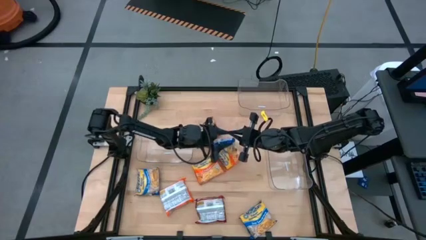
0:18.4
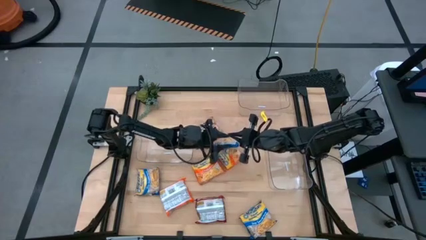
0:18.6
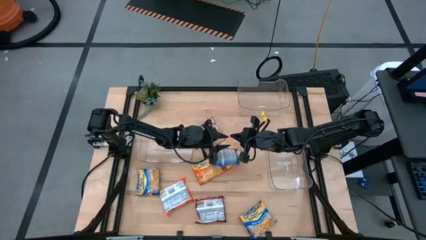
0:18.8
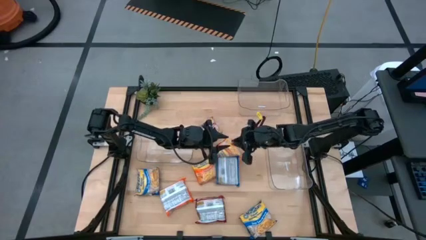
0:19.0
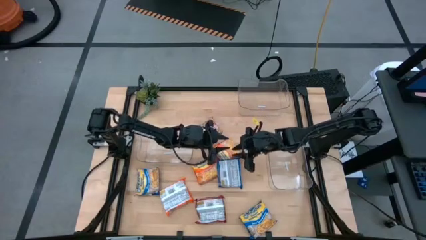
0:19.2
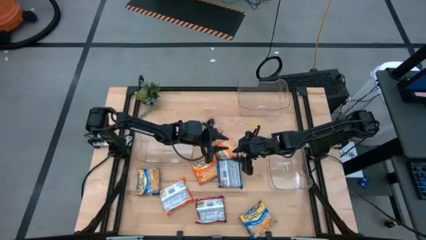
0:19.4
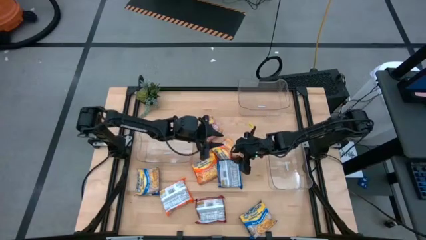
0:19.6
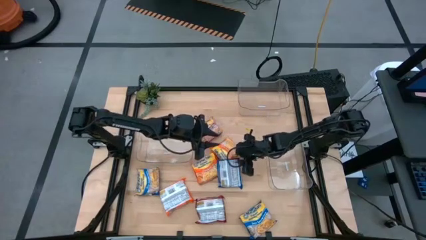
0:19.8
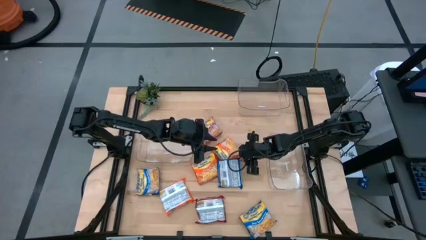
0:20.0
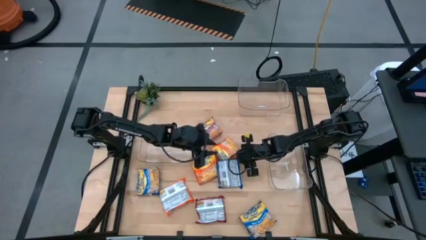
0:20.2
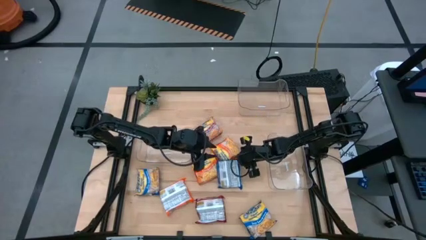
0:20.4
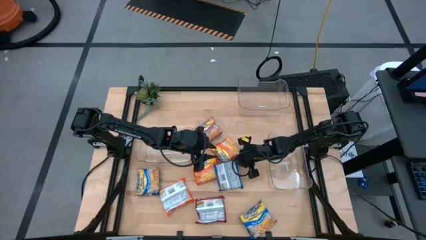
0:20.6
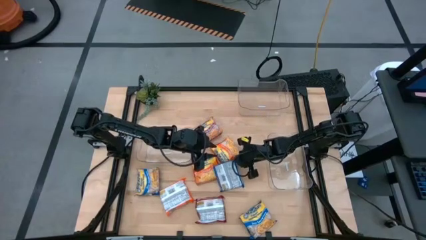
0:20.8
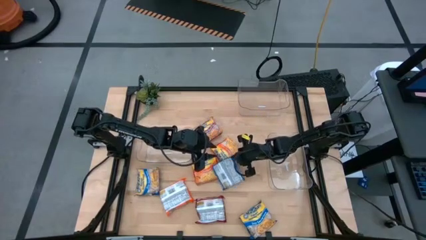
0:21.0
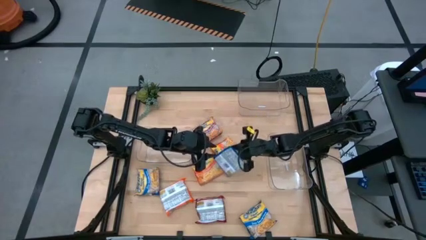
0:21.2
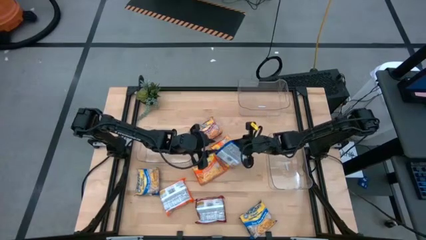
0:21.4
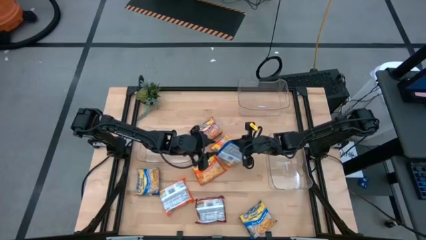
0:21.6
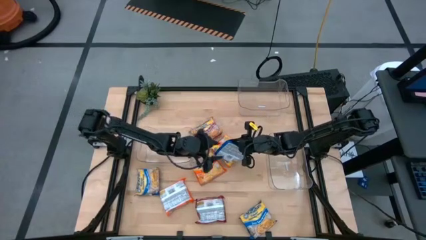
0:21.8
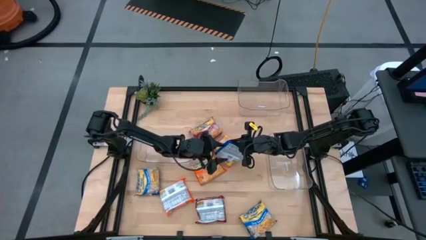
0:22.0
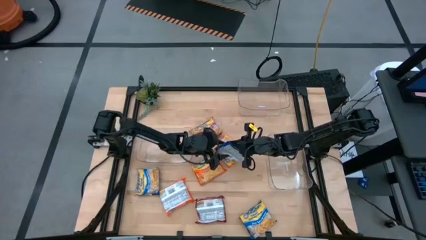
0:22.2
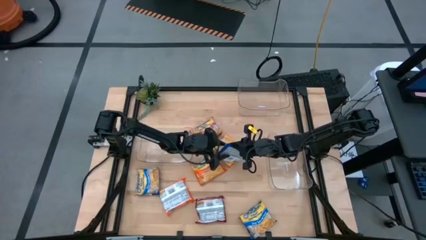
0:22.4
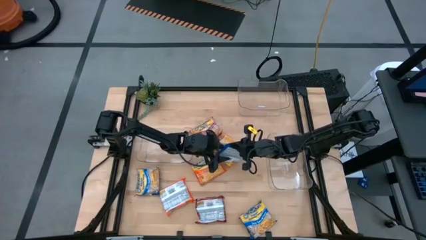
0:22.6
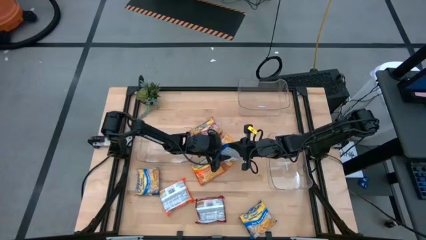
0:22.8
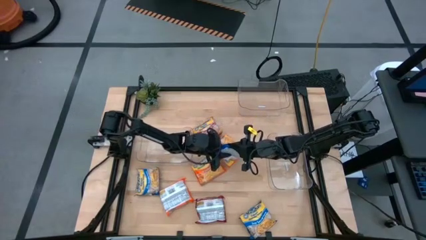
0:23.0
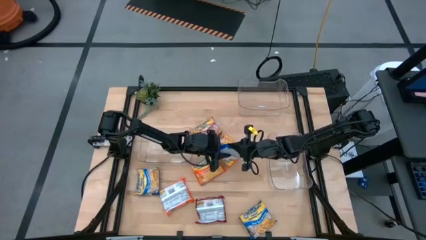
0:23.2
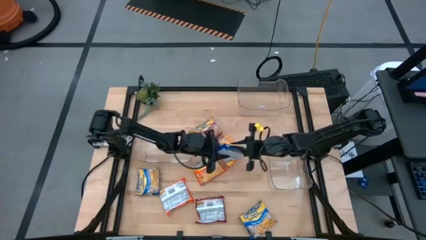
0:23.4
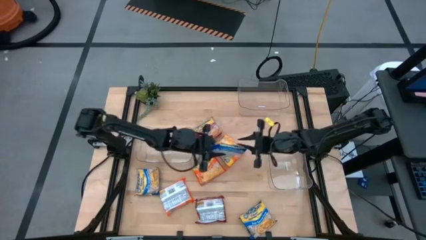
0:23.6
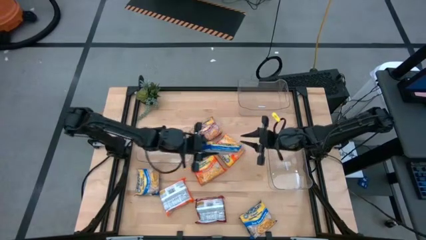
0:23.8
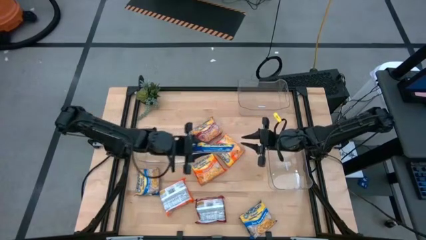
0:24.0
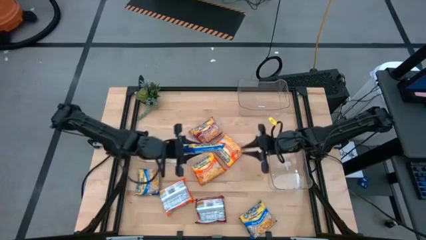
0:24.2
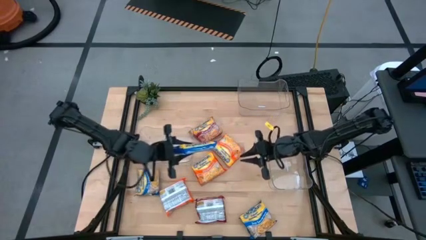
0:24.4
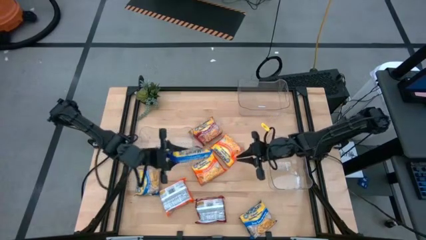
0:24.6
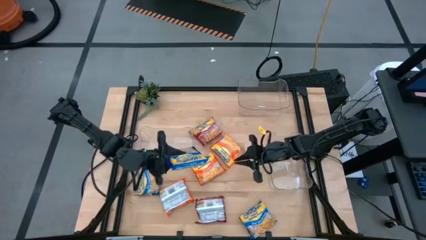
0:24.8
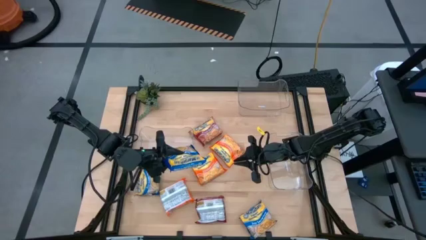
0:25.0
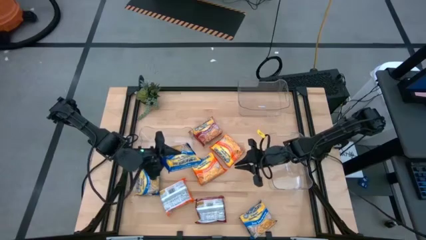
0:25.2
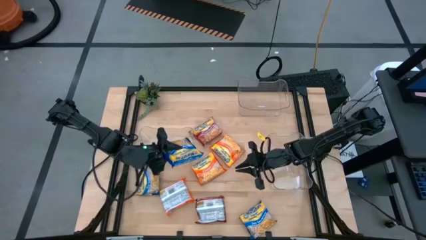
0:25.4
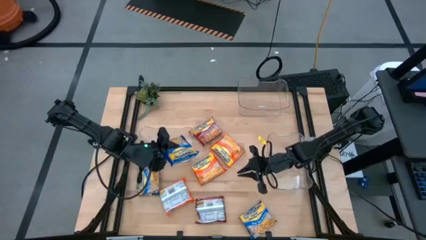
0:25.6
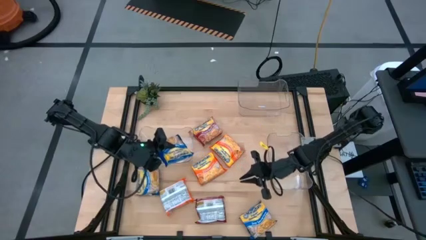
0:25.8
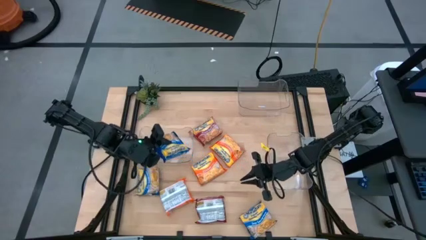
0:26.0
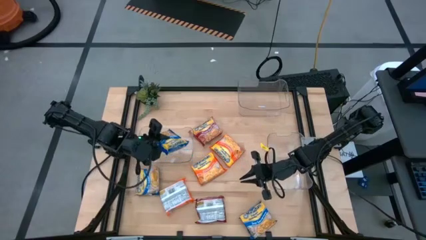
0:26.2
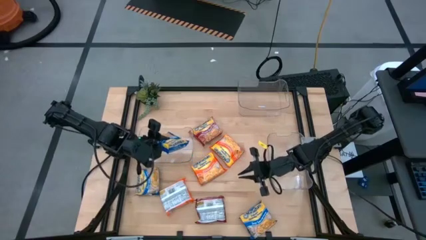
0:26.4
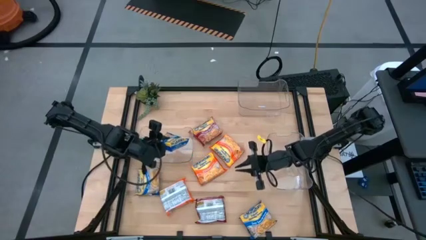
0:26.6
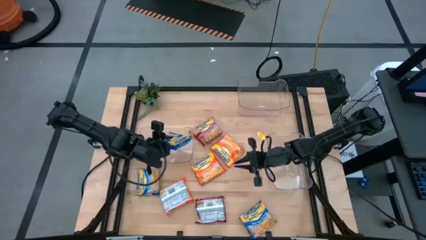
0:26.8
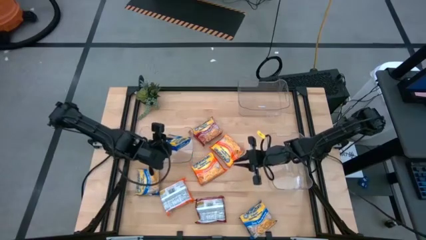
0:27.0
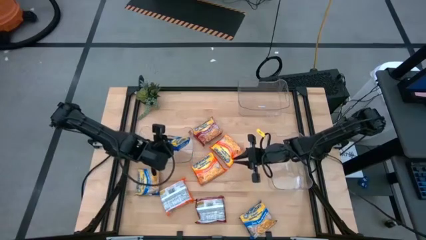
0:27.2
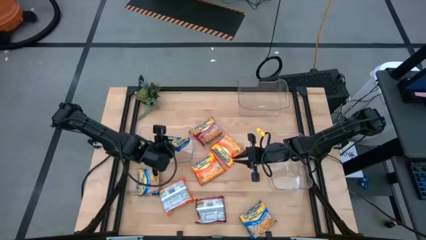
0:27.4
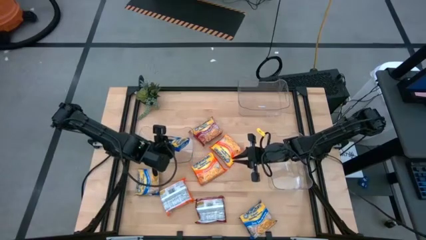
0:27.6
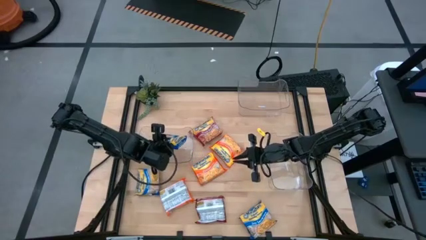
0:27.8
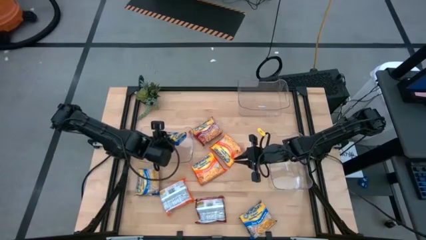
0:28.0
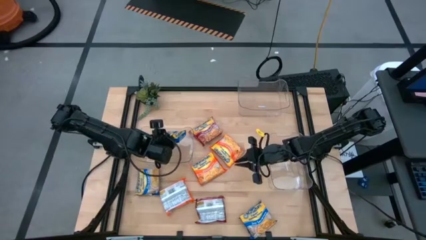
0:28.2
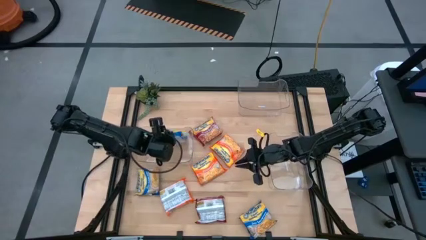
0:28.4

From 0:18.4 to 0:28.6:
Task: Sort Maruchan noodles
Put the top right blue noodle pack into the bottom left transparent bin

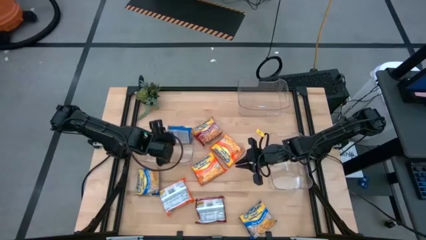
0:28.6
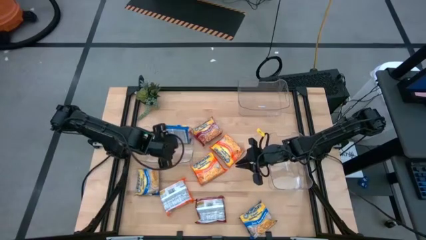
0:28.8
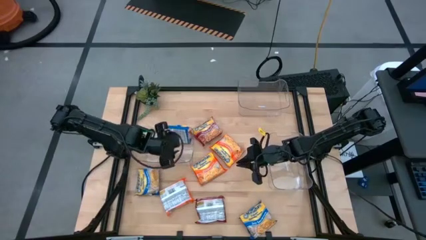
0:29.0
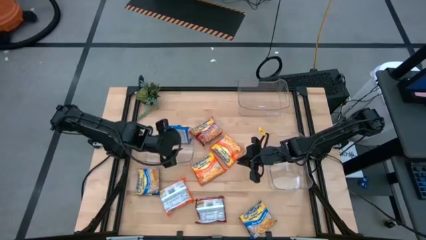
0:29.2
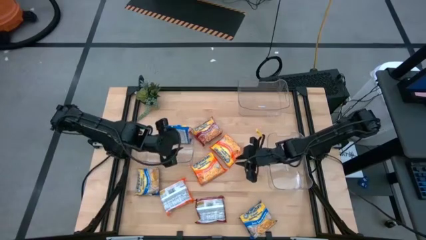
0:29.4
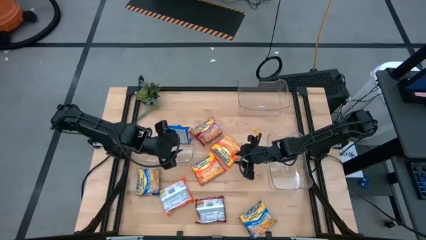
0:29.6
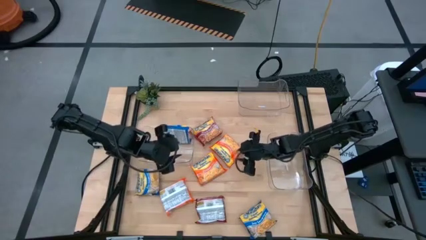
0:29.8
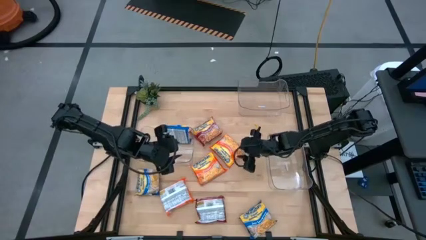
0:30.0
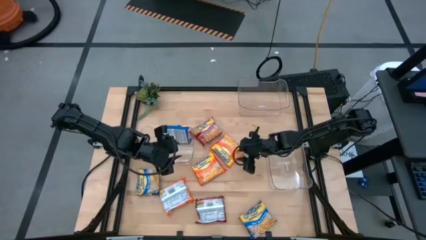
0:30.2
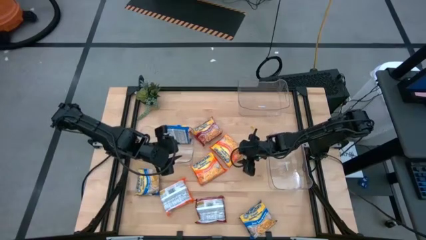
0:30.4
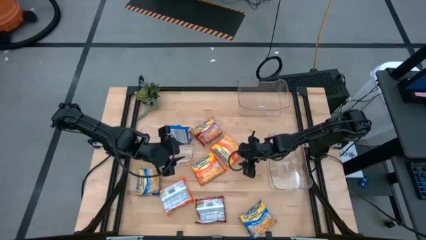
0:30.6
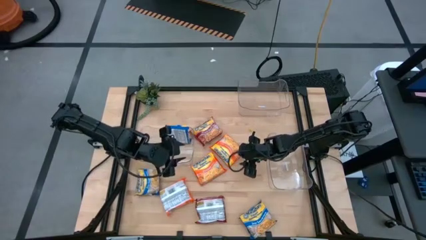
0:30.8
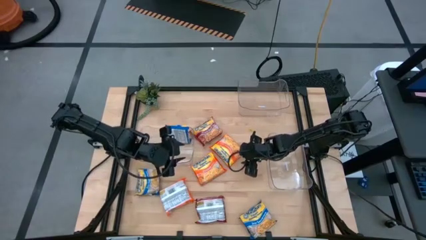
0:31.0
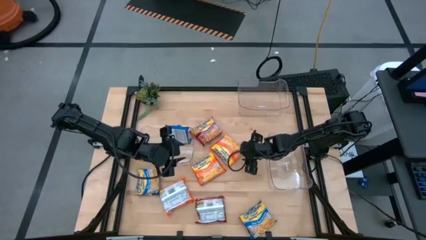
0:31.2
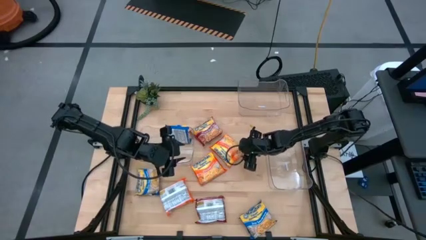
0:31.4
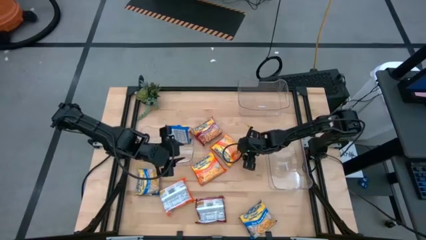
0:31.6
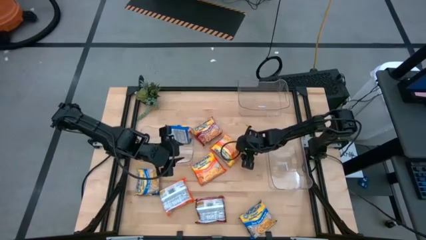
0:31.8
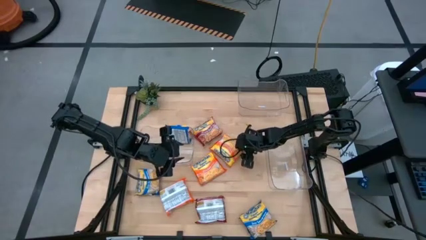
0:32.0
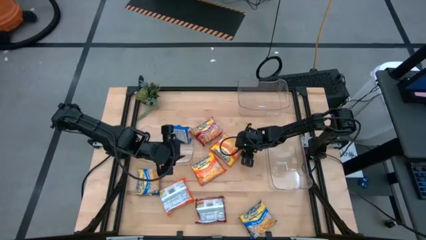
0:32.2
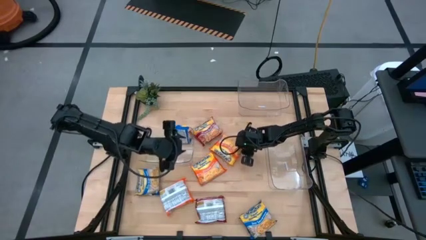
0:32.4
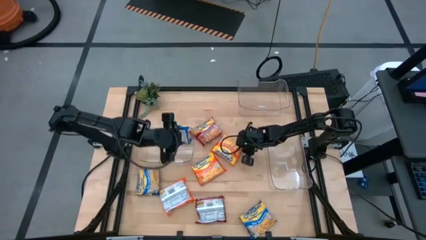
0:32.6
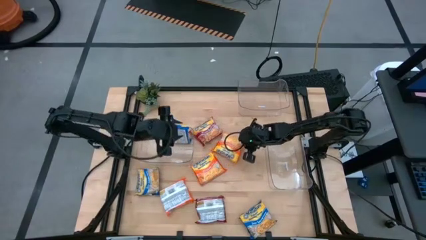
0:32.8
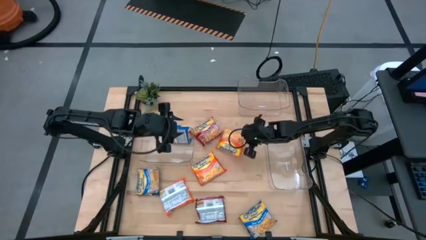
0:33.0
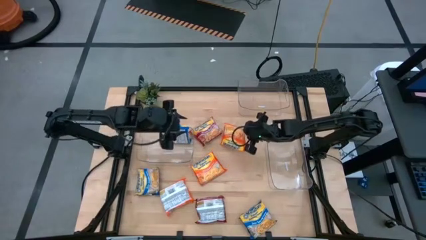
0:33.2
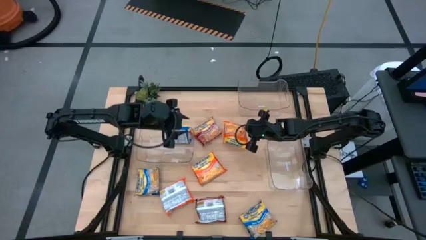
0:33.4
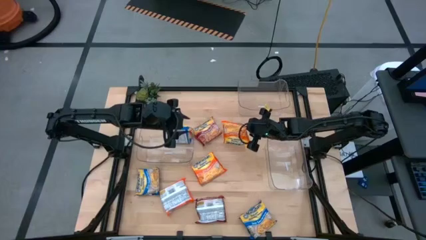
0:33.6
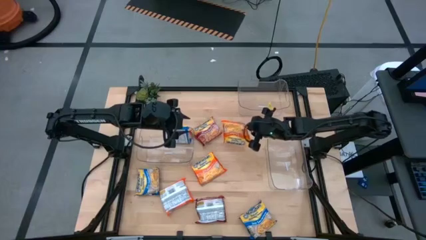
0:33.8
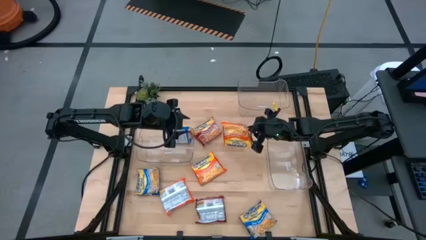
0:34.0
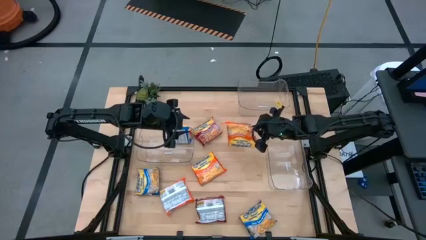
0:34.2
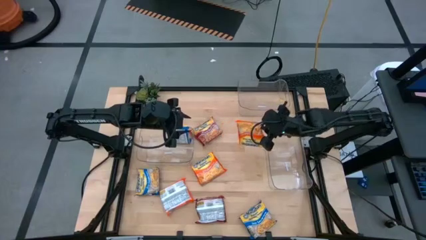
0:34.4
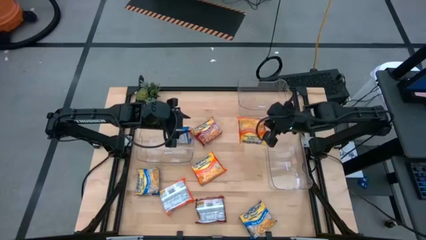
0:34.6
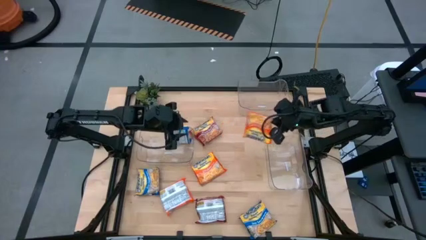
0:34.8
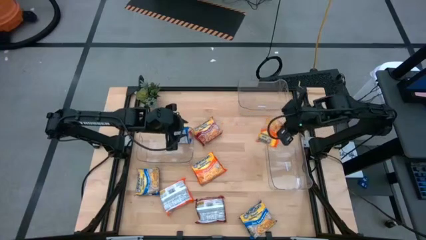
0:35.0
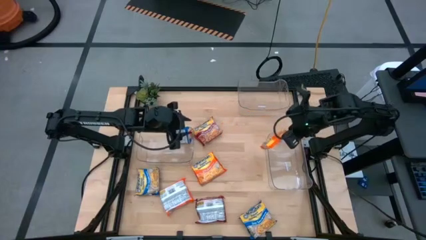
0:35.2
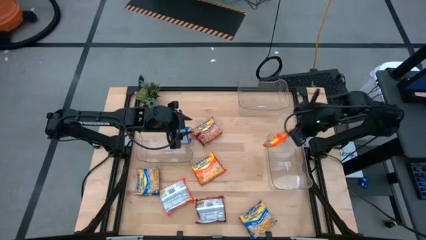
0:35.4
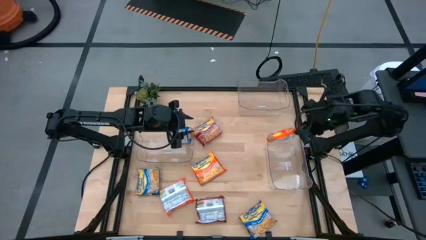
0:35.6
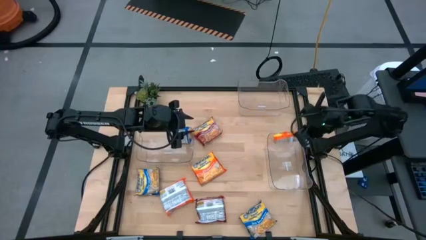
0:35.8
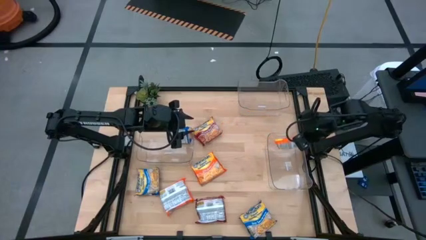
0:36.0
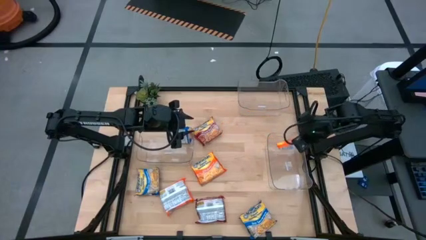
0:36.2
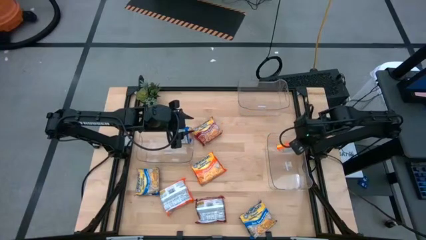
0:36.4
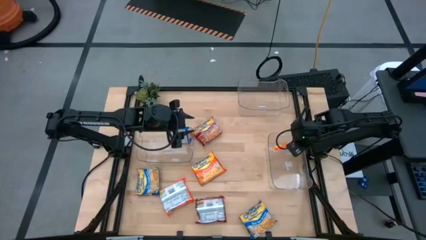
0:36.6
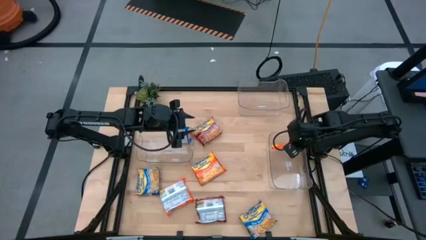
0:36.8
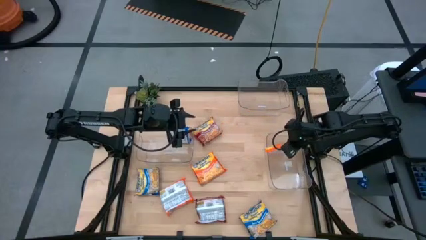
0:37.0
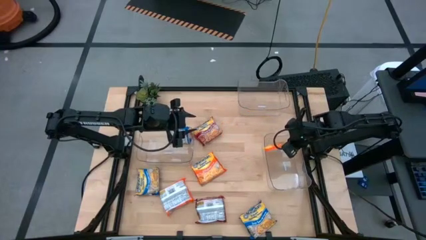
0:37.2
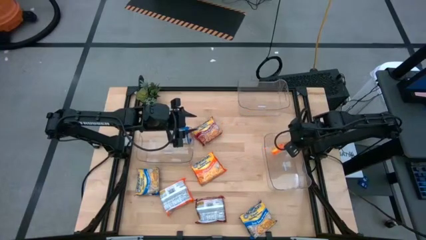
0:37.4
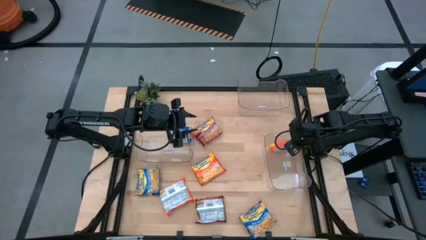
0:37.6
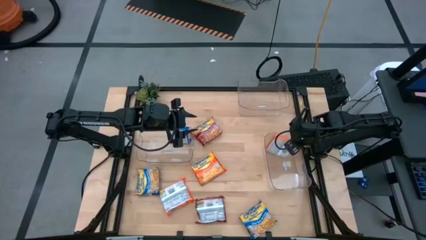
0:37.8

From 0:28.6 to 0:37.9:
Put the top orange noodle pack into the bottom right transparent bin
